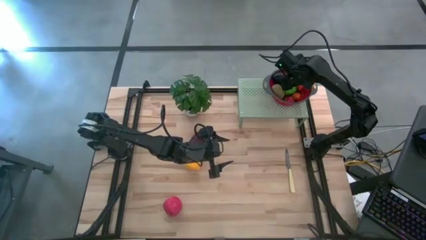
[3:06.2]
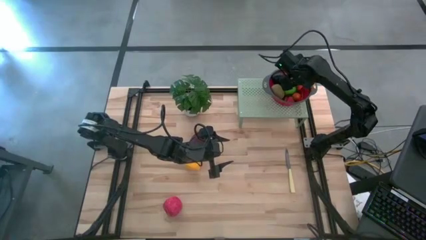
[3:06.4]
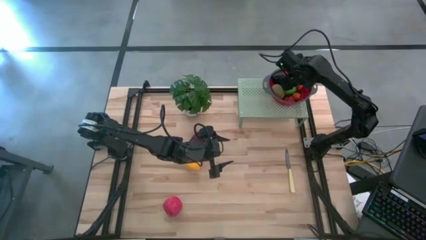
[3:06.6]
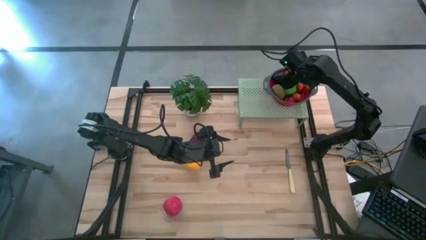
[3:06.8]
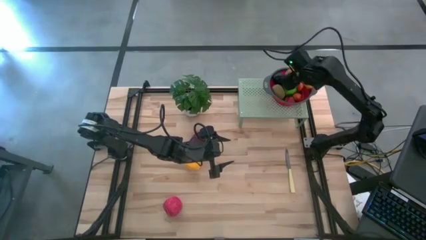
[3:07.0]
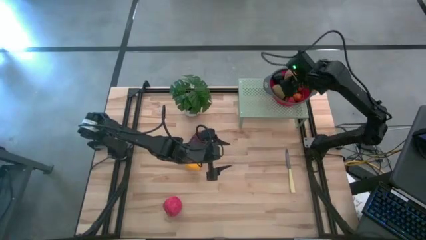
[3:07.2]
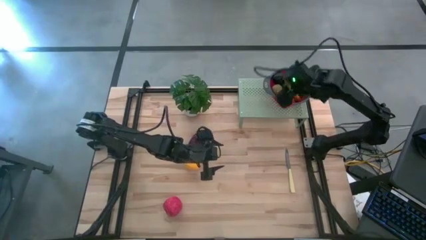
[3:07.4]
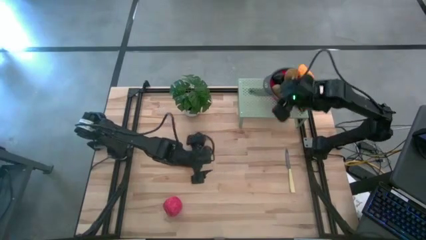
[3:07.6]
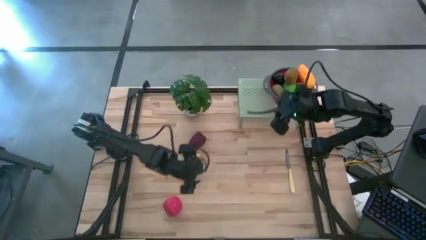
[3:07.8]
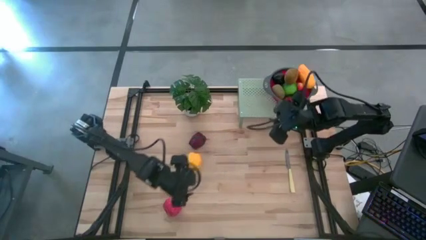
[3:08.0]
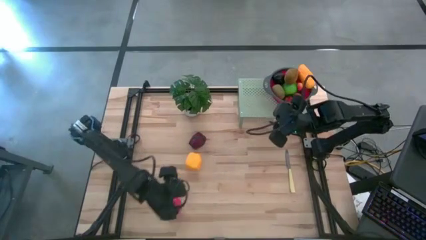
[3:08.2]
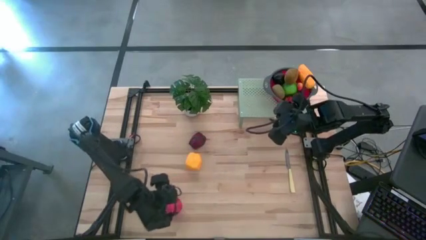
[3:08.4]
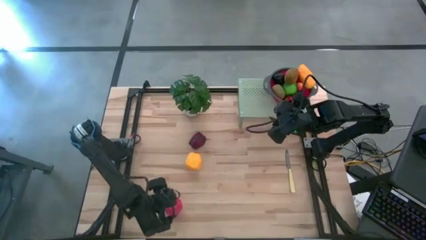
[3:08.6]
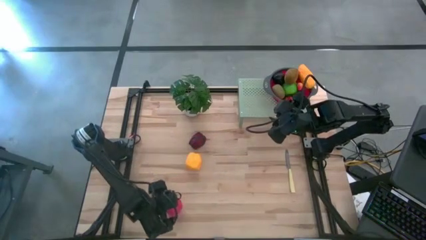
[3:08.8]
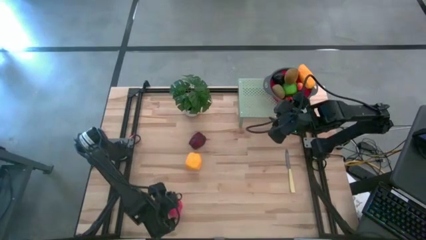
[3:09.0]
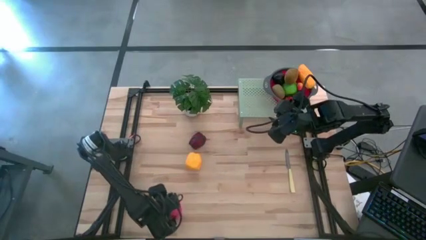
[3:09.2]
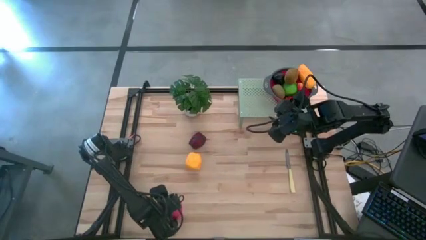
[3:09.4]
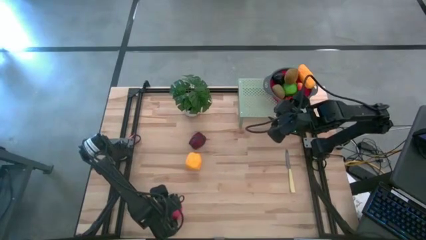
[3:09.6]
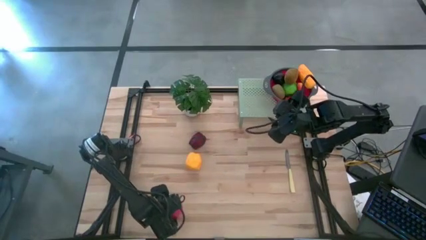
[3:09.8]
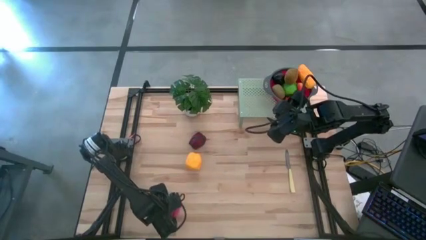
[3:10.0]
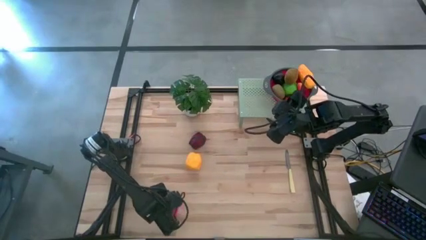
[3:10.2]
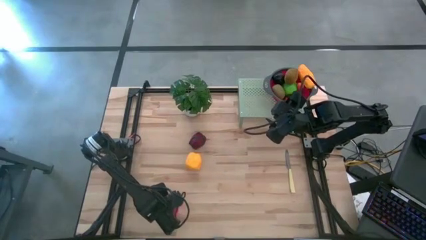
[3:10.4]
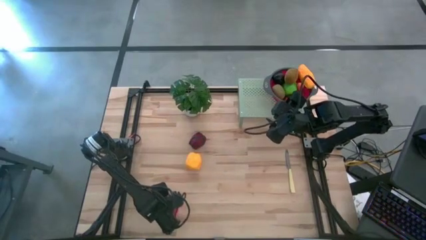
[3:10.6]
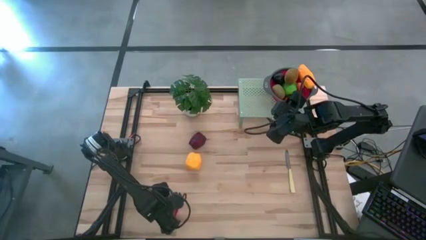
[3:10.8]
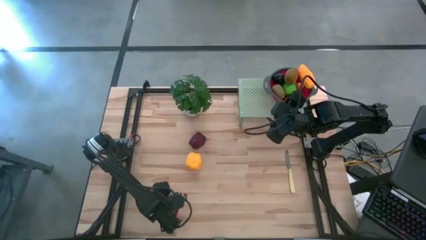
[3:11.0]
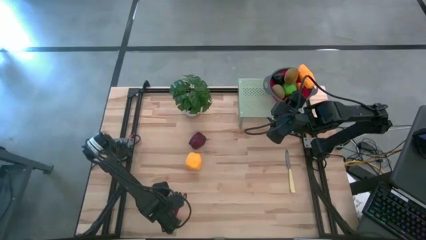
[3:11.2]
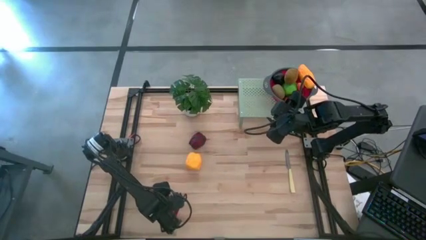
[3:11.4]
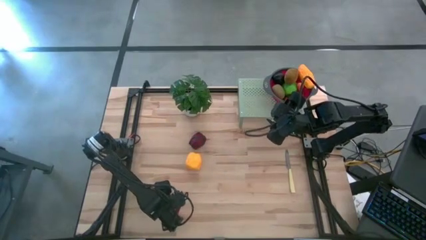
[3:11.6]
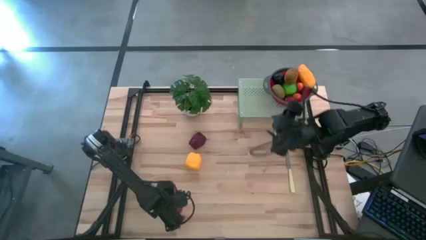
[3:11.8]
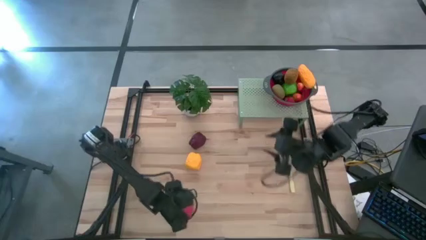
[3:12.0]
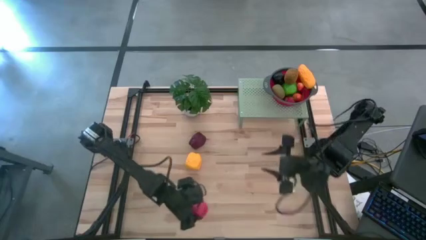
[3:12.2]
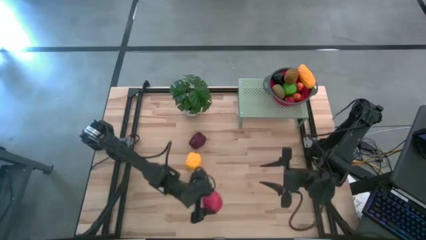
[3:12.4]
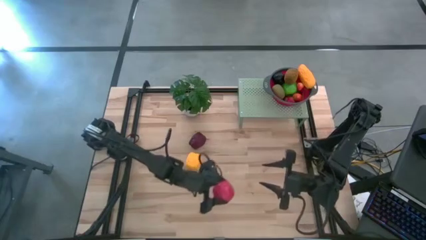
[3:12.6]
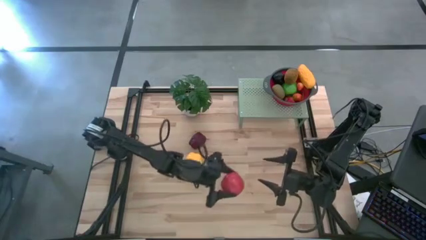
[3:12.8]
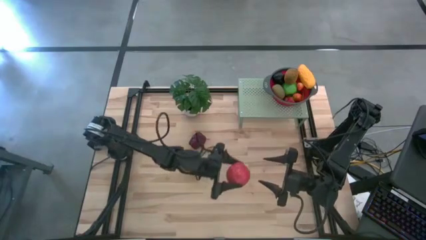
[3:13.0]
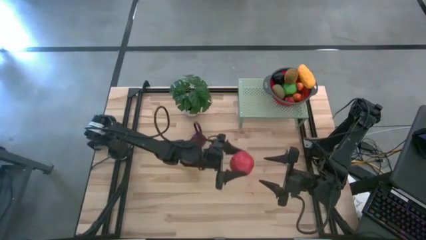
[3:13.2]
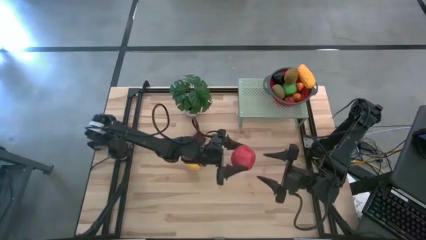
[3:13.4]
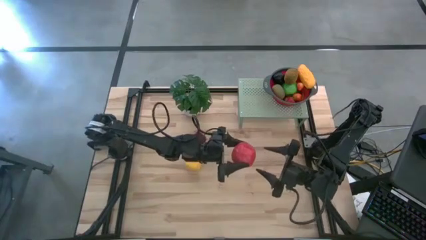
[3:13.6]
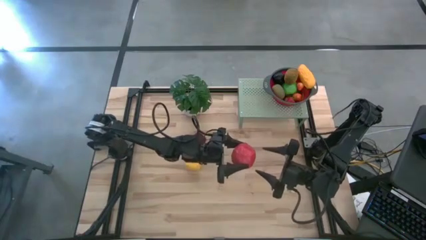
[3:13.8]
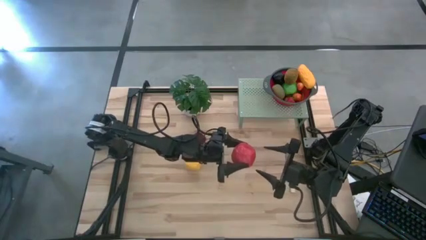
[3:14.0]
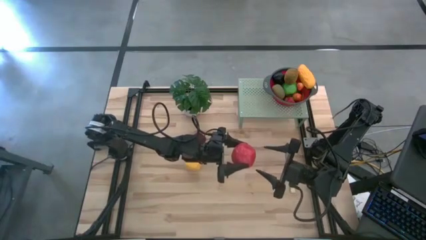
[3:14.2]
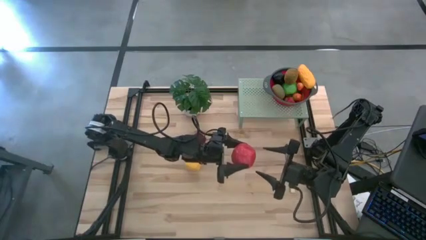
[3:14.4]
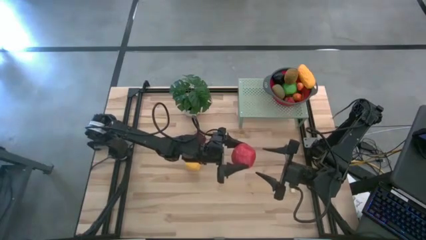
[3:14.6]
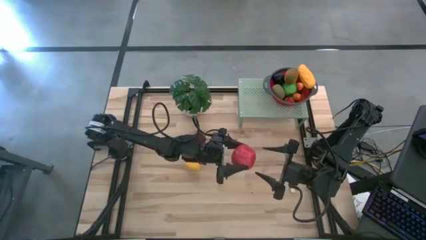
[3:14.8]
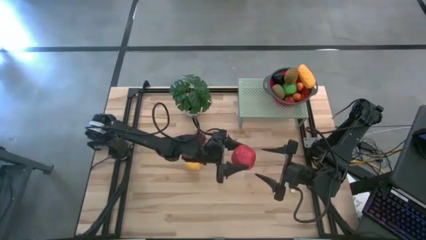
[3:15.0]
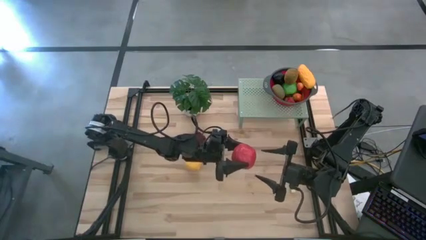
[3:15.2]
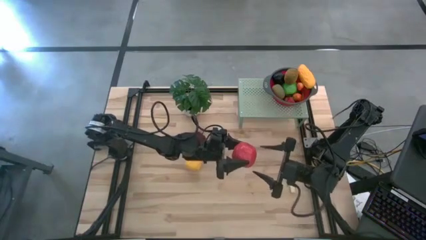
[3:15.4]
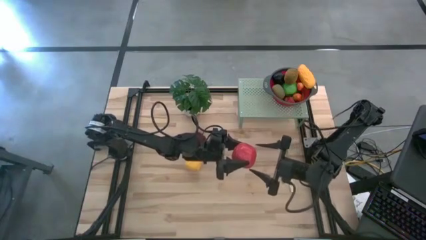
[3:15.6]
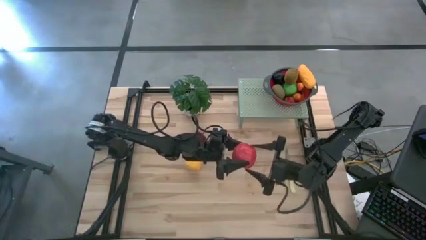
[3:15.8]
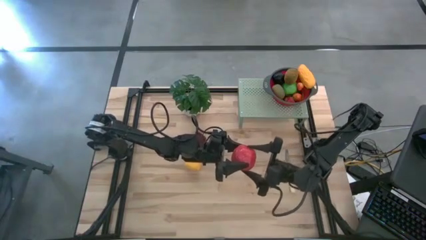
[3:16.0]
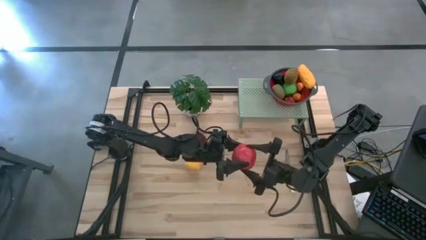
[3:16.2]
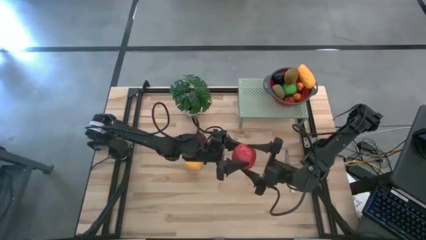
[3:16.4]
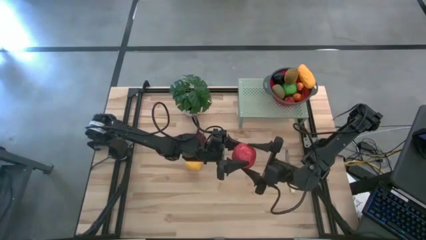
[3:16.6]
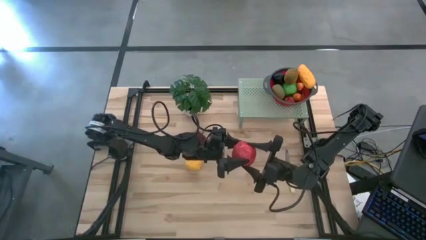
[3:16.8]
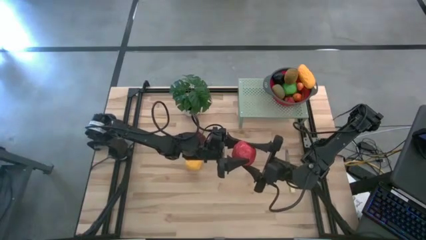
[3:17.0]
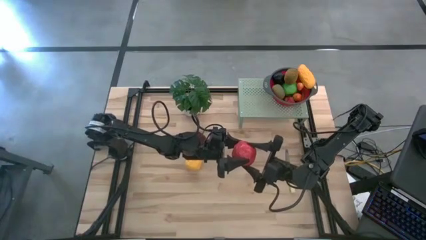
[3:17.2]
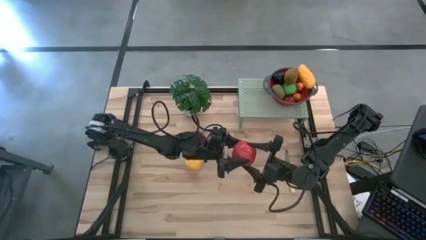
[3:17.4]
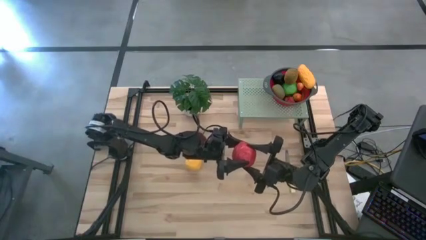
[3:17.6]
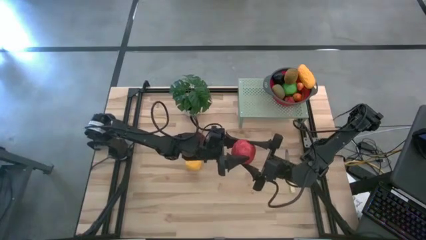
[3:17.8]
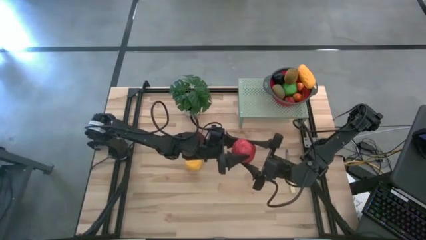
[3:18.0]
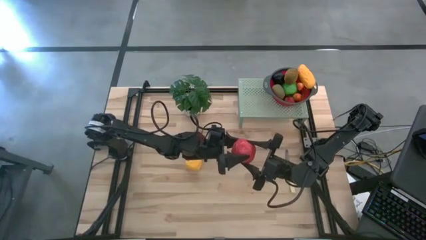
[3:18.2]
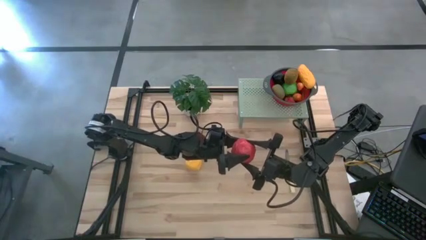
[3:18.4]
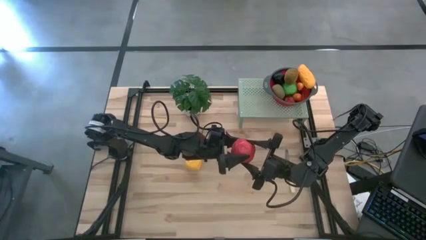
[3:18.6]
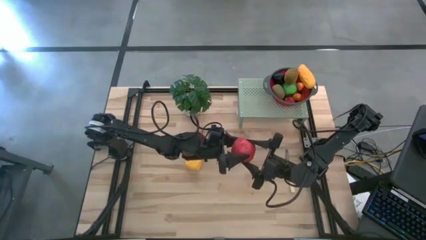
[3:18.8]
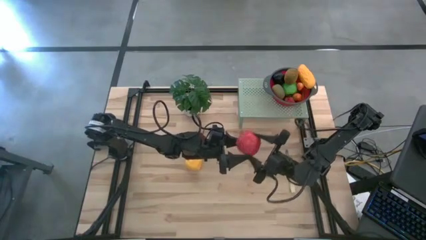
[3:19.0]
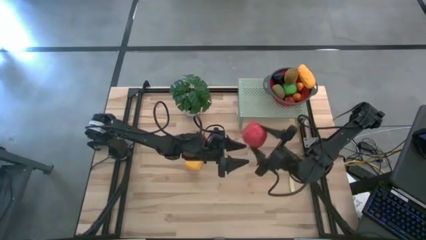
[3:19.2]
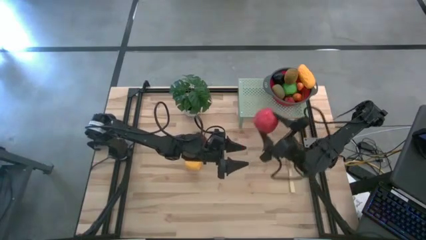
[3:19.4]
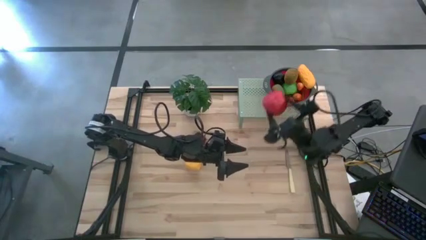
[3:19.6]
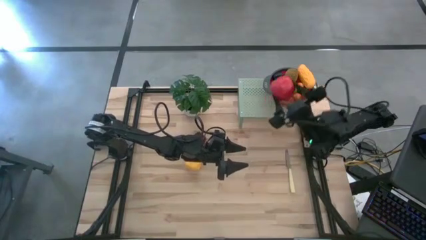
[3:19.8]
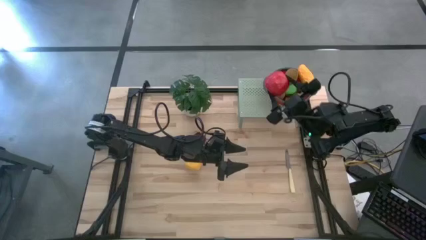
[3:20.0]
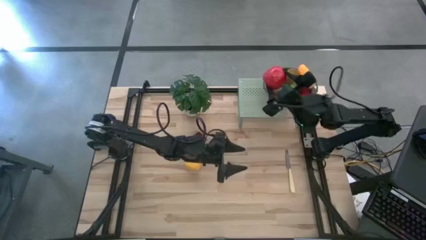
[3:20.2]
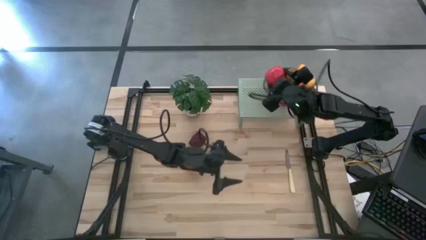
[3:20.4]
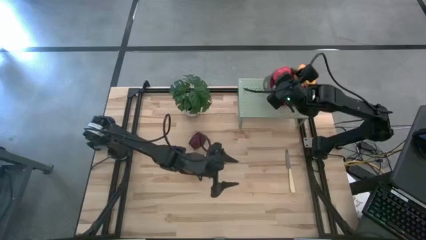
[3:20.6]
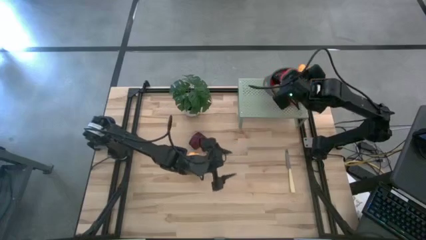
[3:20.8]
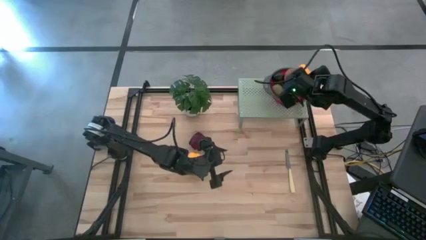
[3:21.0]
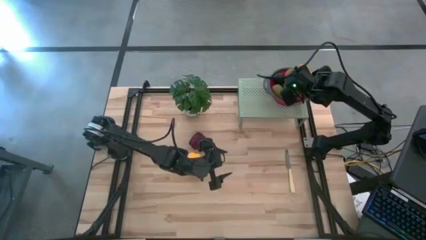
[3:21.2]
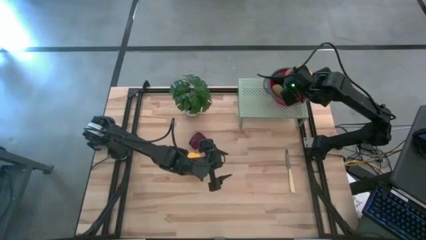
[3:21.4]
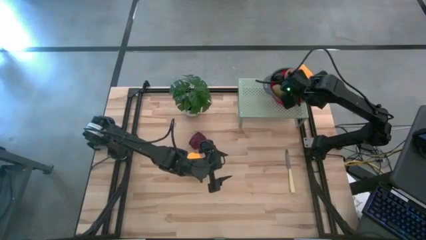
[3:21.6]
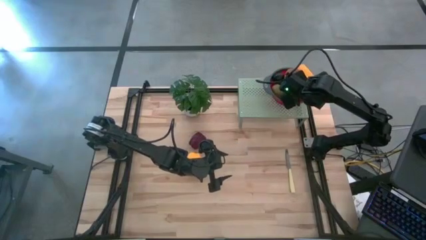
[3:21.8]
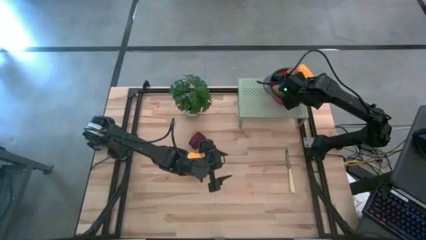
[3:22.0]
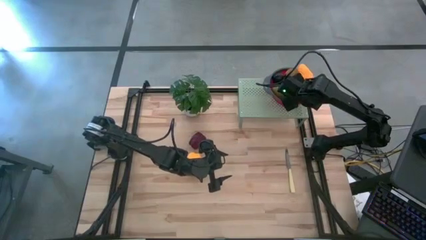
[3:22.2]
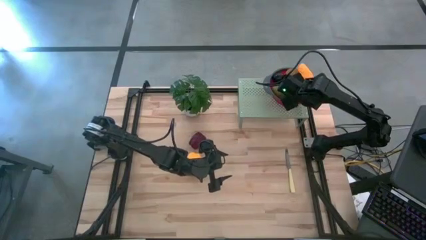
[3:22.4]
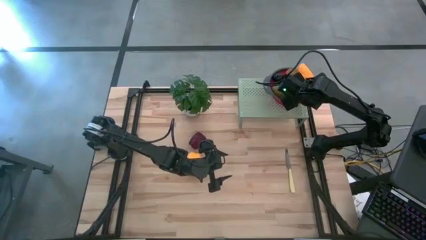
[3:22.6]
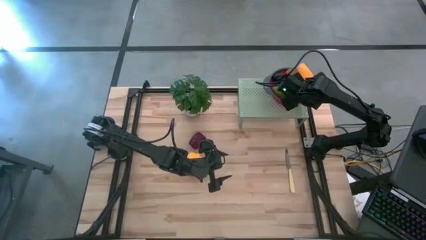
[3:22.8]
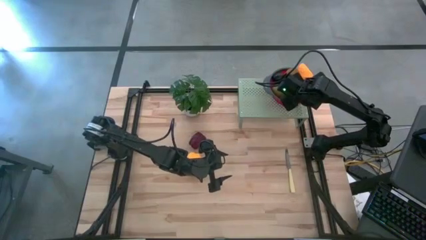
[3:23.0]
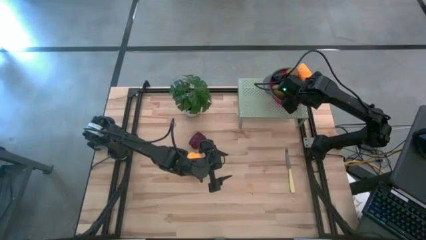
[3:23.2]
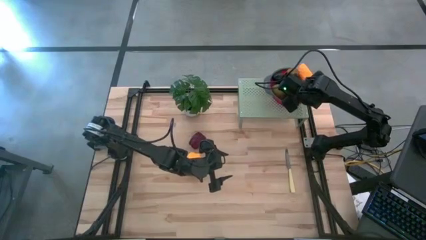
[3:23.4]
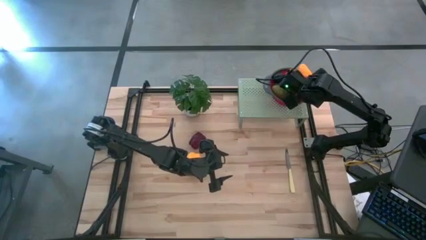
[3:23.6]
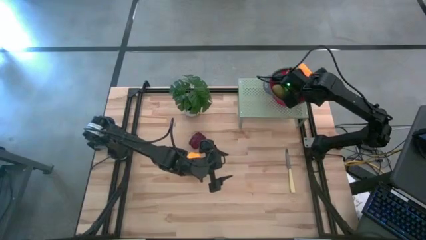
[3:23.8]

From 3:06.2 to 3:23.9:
Task: Pick & Place Fruit
Put the red apple into the red strainer bowl on the shelf
